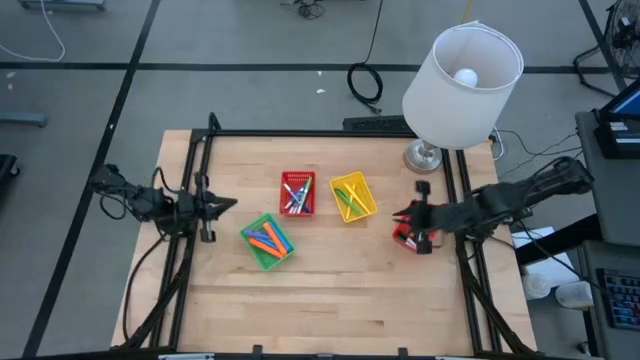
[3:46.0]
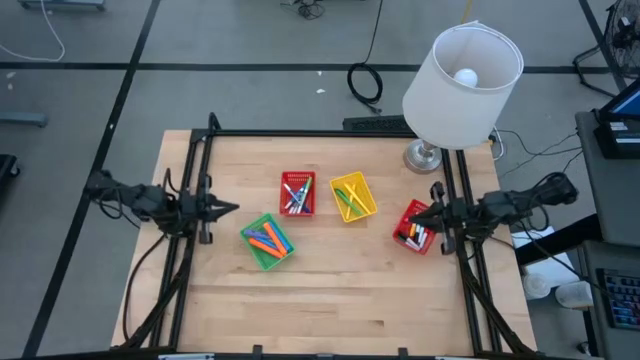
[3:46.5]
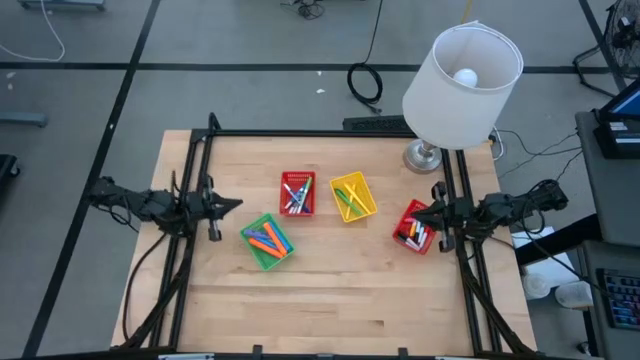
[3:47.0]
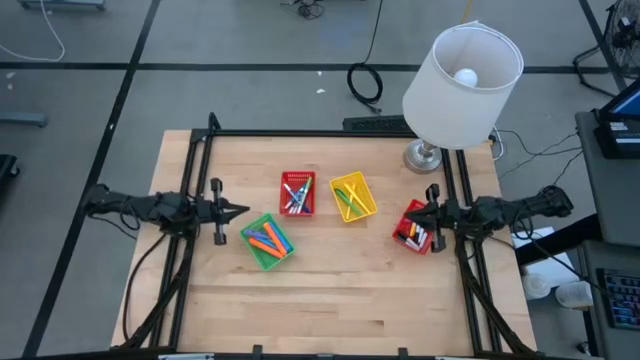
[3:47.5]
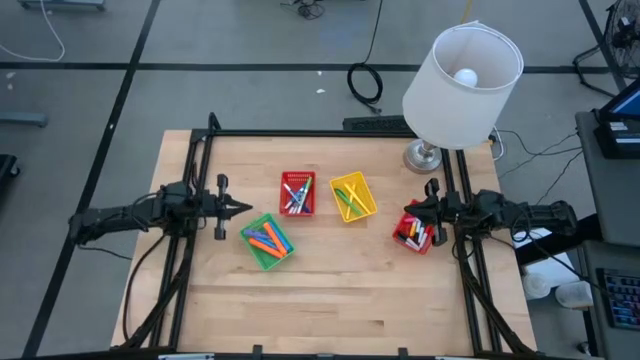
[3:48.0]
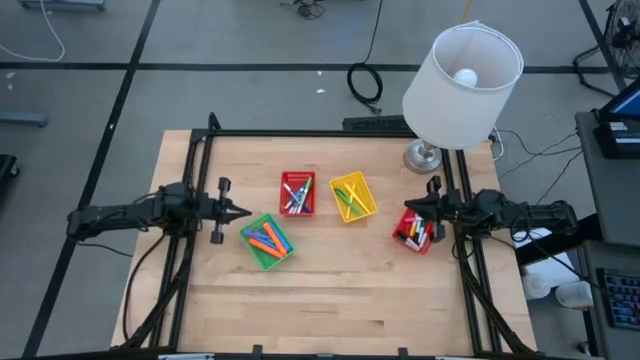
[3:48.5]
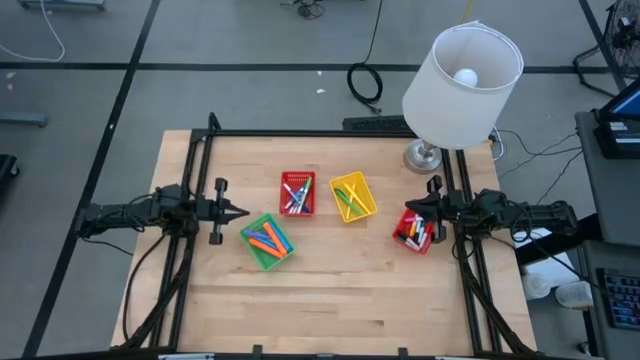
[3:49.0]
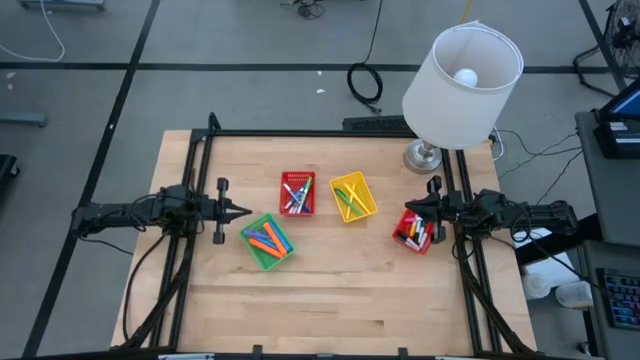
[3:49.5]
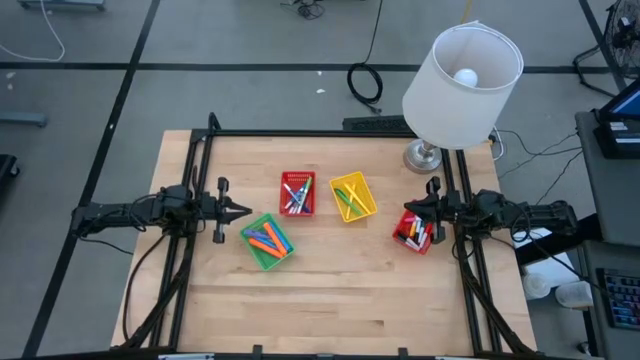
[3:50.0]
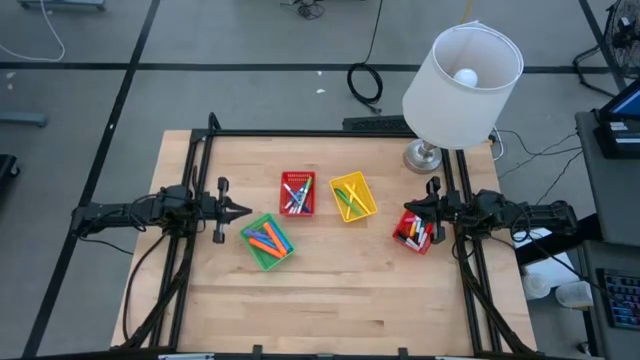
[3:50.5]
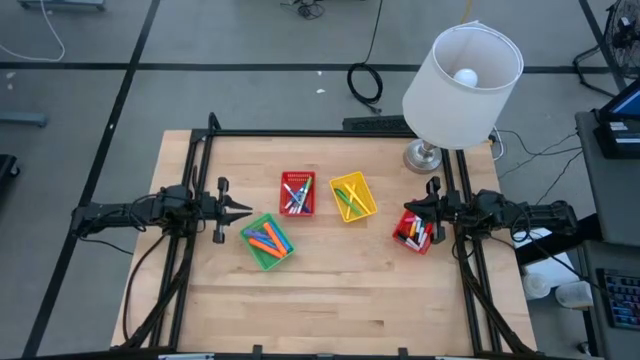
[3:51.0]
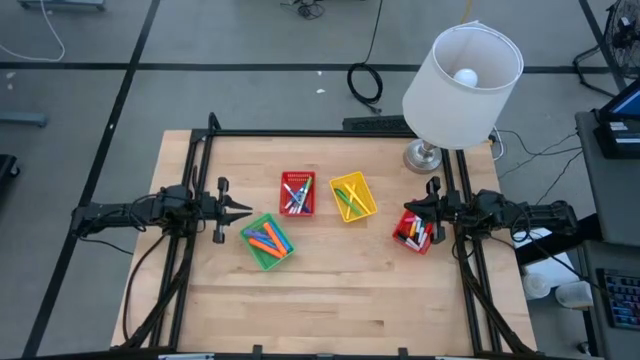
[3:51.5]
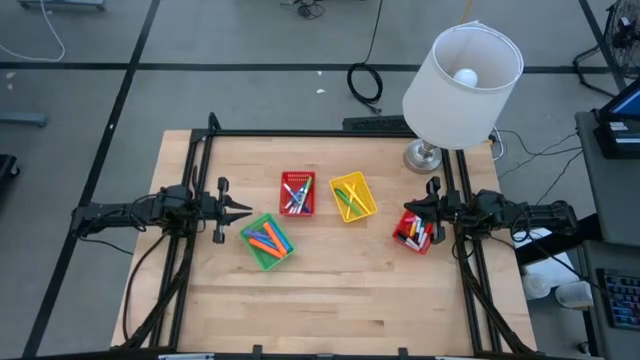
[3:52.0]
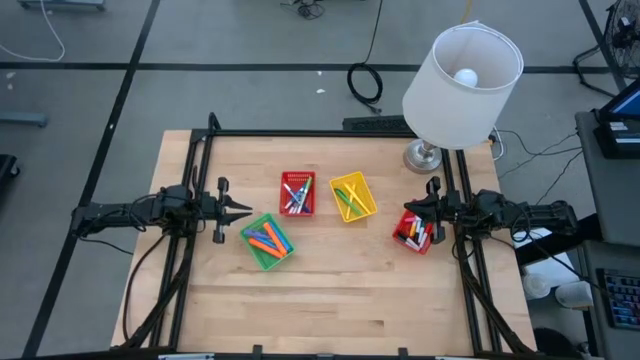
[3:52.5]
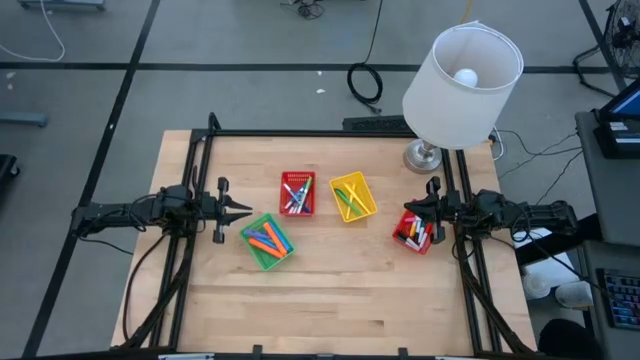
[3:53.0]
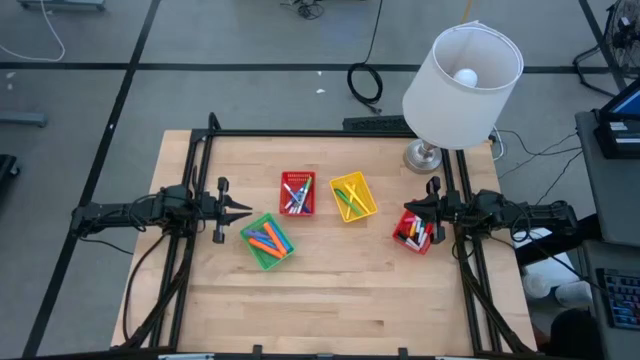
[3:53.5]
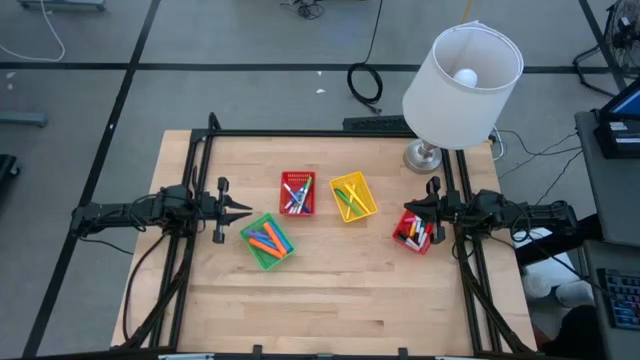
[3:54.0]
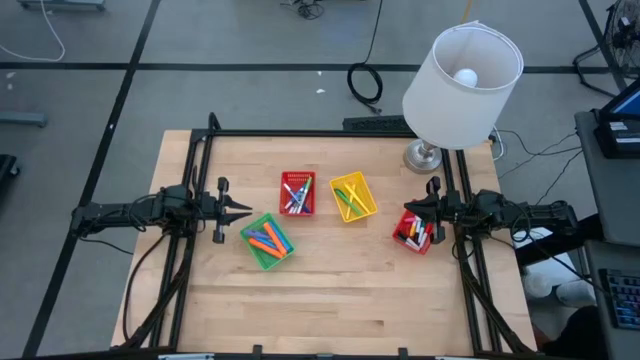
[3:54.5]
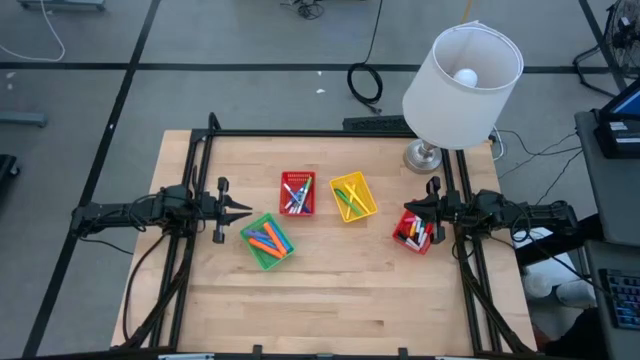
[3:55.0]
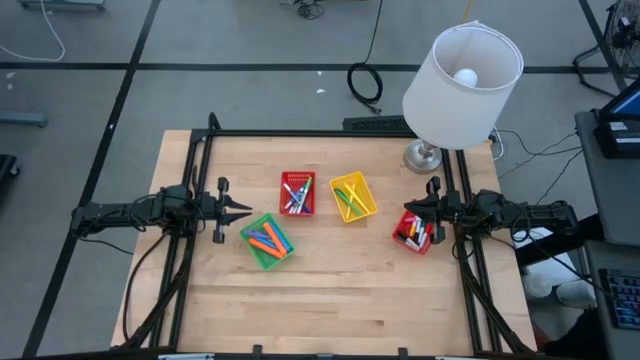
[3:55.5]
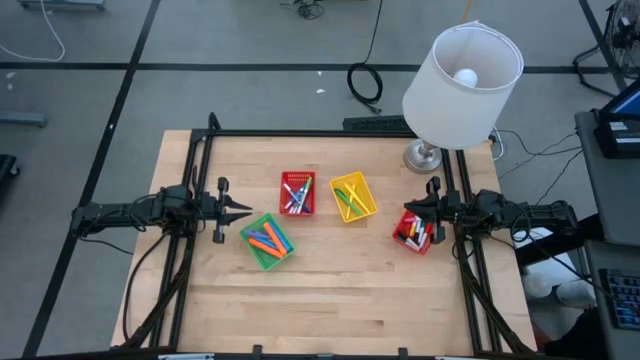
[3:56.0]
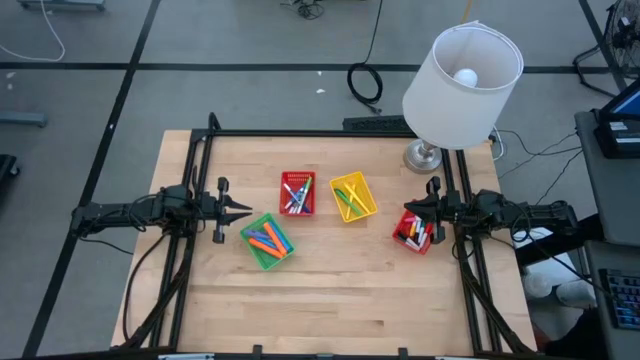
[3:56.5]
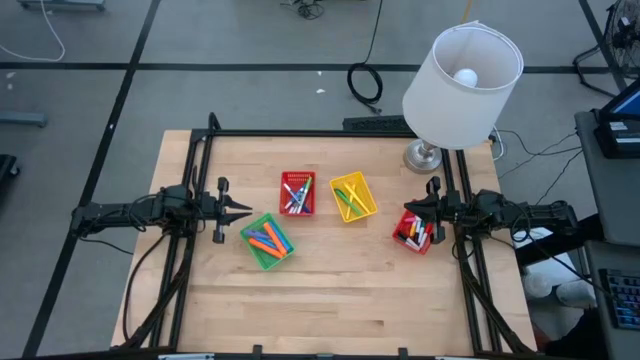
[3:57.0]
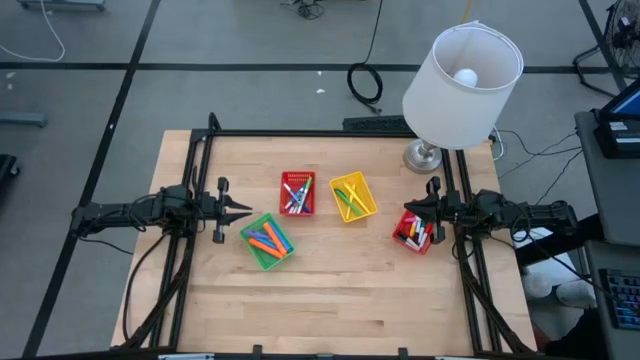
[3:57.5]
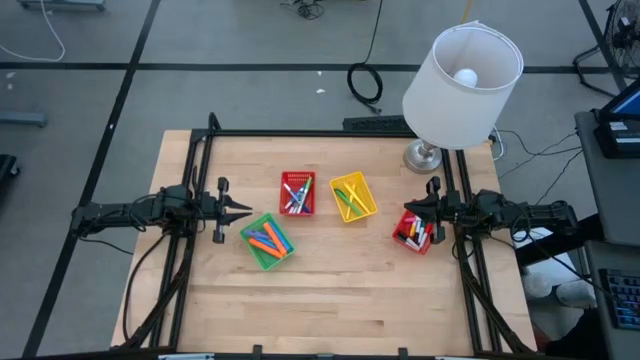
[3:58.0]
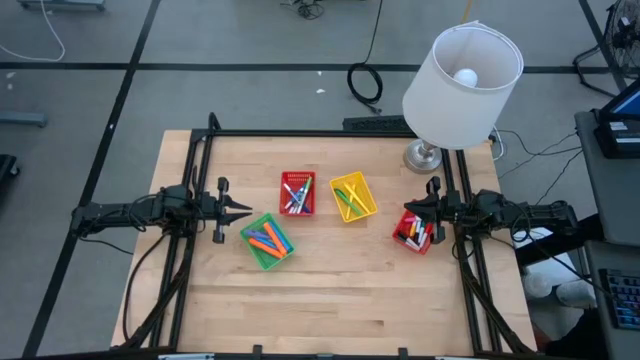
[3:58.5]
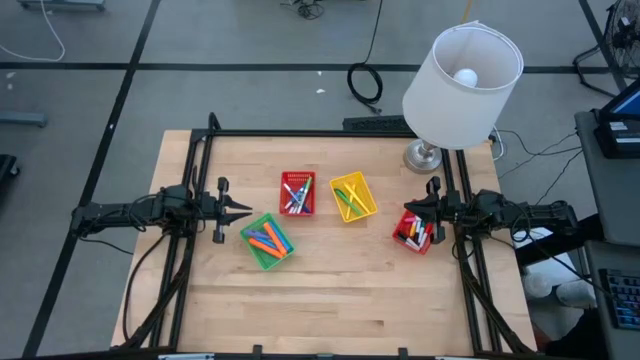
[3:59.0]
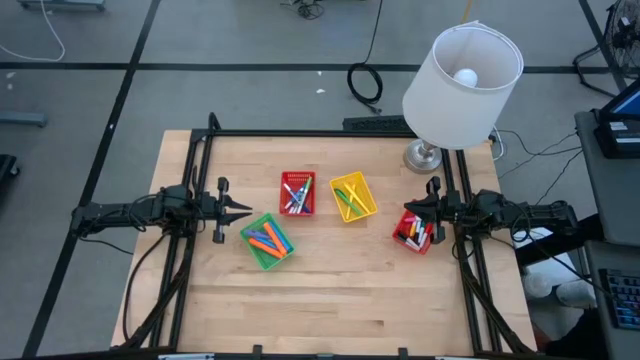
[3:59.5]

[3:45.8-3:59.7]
Task: Pick & Place Markers
Return to Home Position
